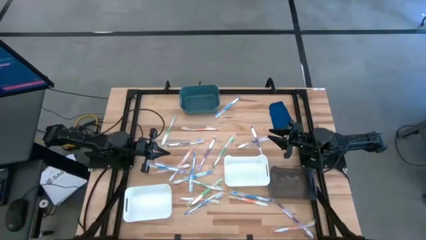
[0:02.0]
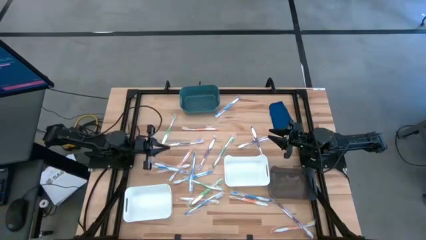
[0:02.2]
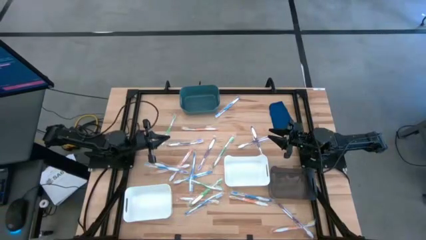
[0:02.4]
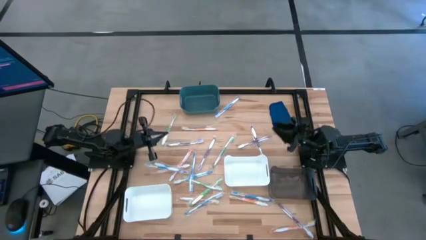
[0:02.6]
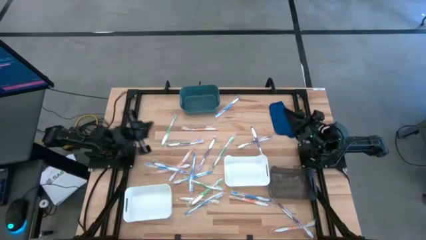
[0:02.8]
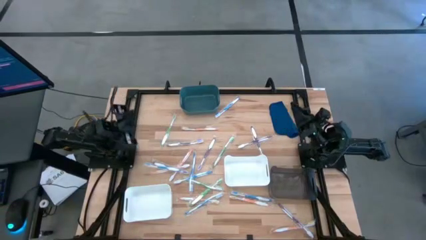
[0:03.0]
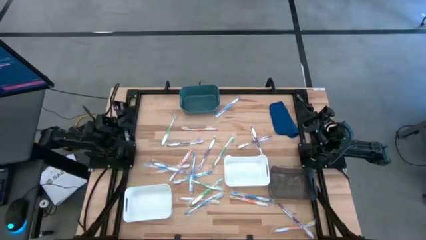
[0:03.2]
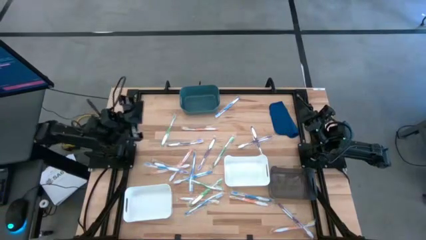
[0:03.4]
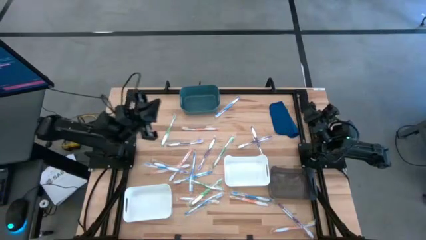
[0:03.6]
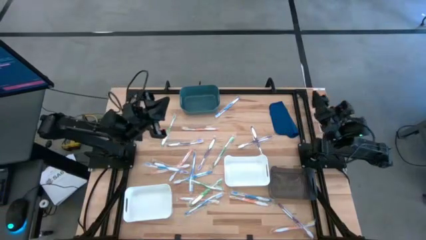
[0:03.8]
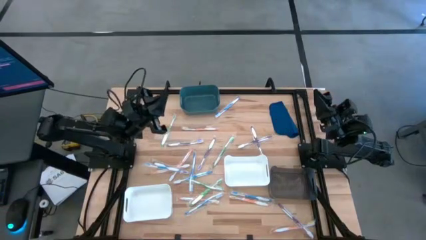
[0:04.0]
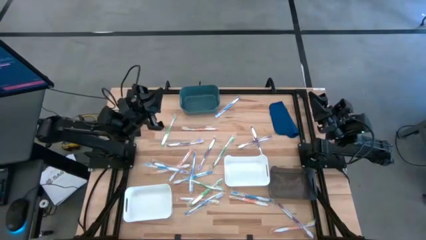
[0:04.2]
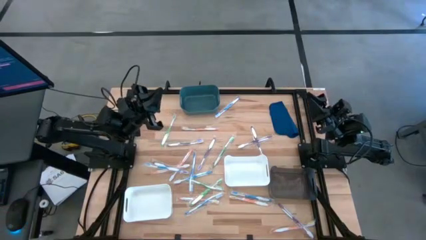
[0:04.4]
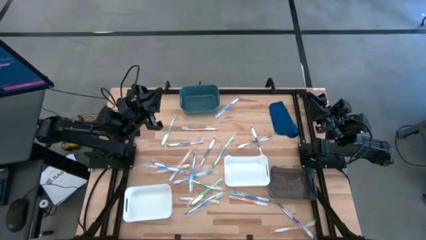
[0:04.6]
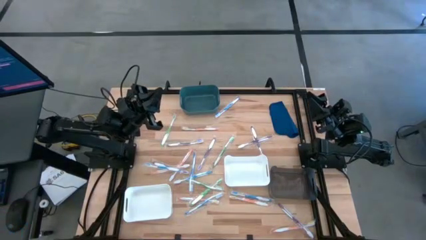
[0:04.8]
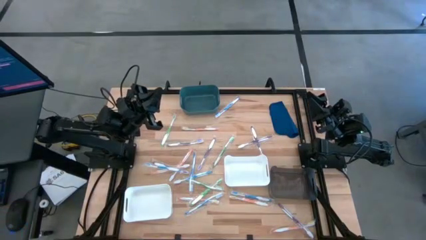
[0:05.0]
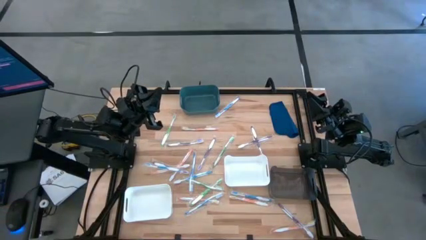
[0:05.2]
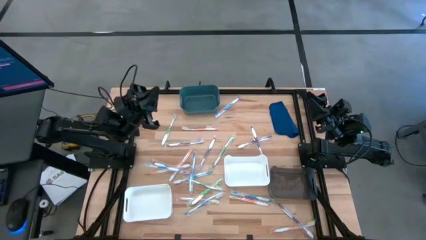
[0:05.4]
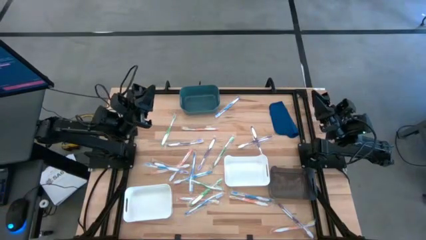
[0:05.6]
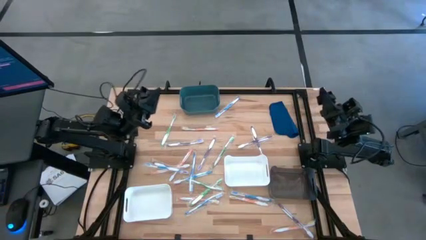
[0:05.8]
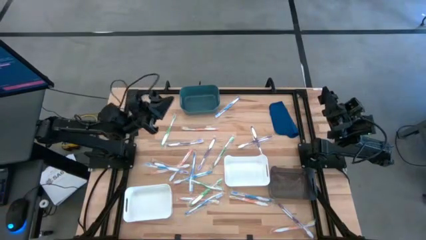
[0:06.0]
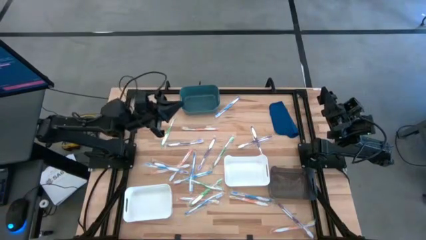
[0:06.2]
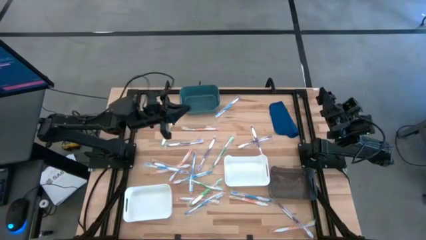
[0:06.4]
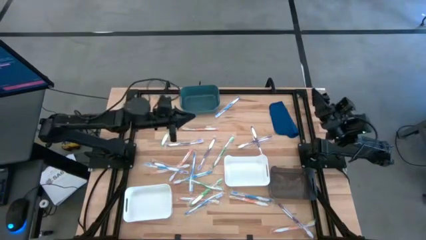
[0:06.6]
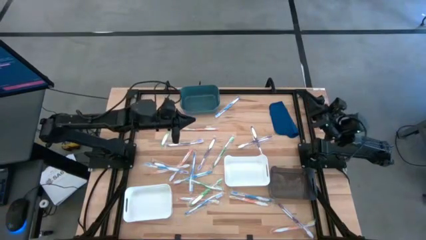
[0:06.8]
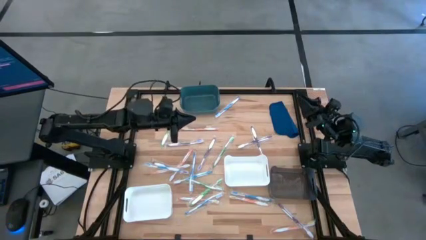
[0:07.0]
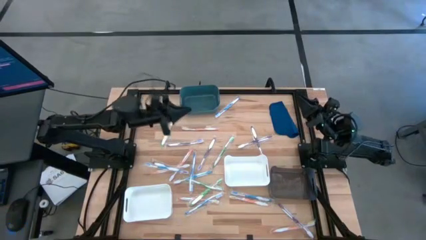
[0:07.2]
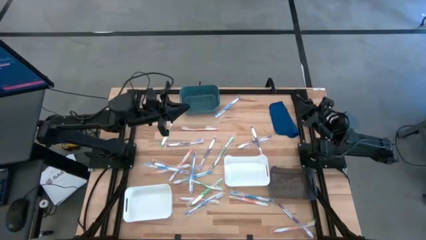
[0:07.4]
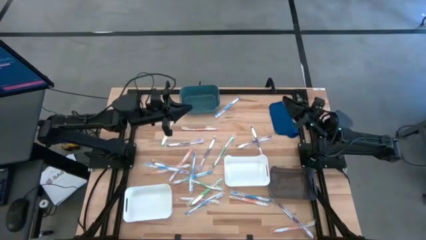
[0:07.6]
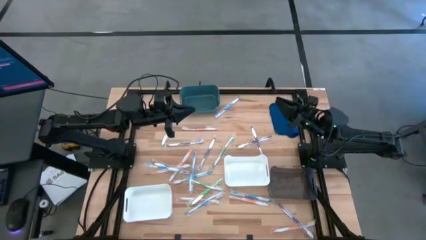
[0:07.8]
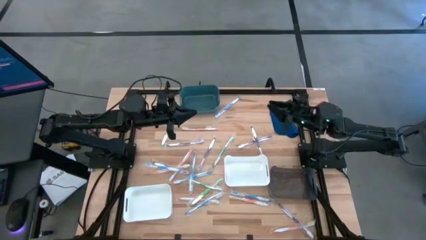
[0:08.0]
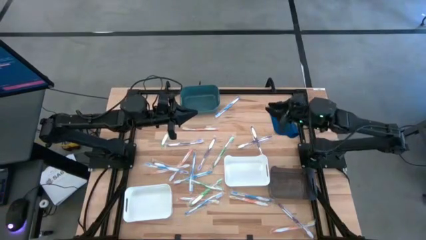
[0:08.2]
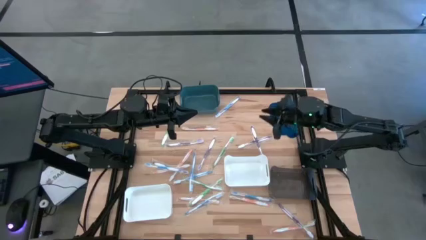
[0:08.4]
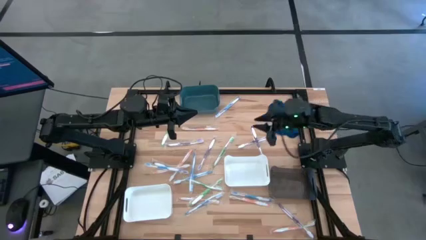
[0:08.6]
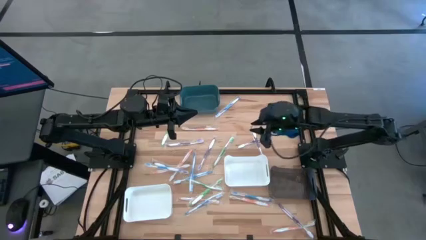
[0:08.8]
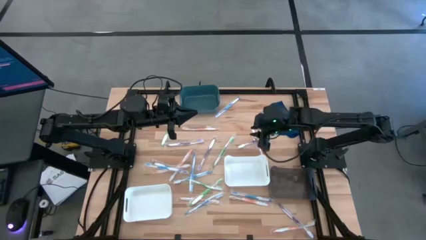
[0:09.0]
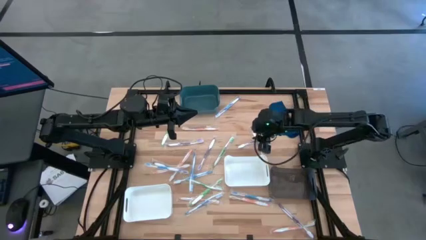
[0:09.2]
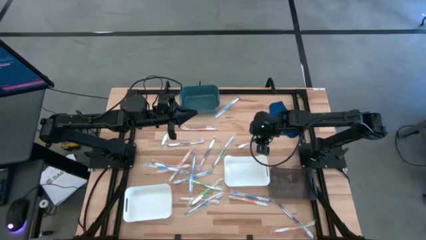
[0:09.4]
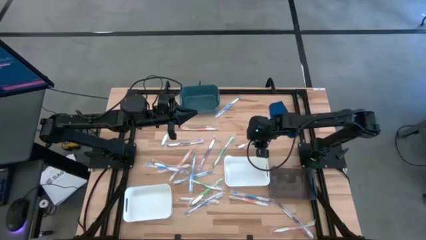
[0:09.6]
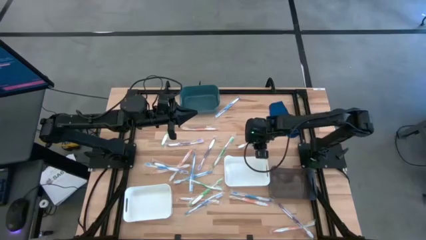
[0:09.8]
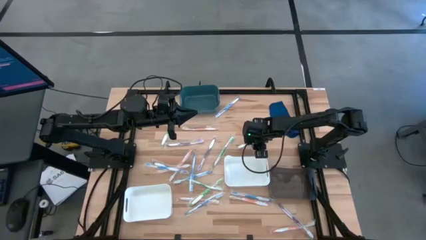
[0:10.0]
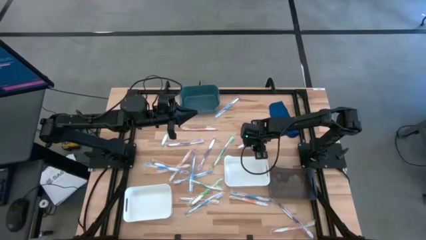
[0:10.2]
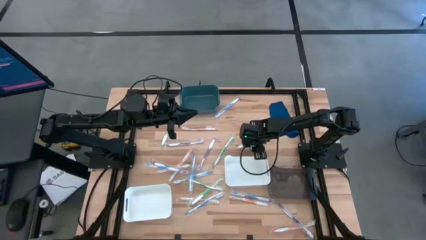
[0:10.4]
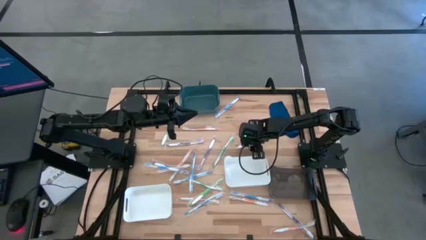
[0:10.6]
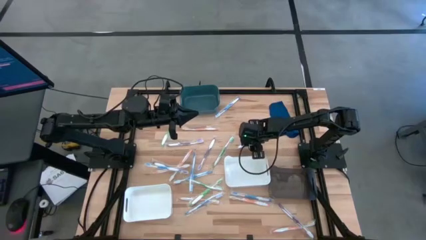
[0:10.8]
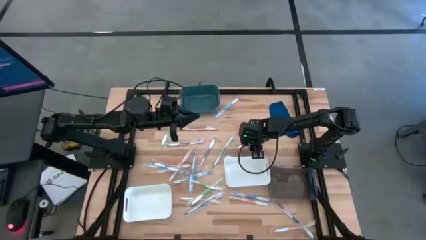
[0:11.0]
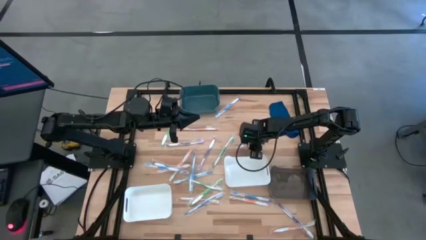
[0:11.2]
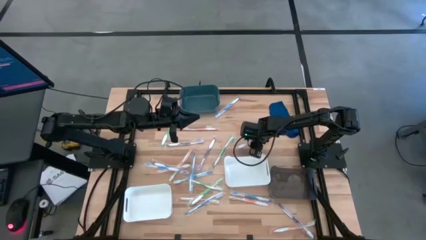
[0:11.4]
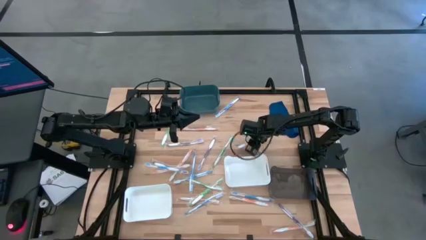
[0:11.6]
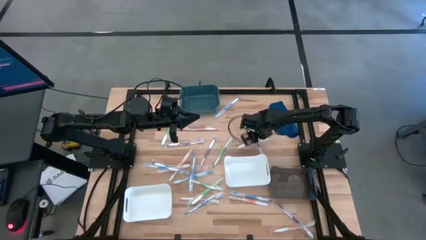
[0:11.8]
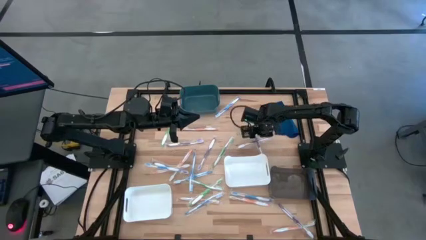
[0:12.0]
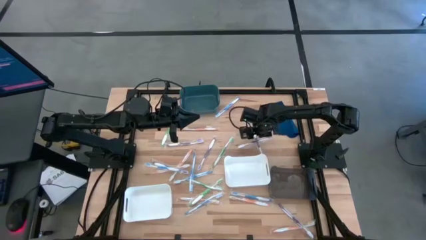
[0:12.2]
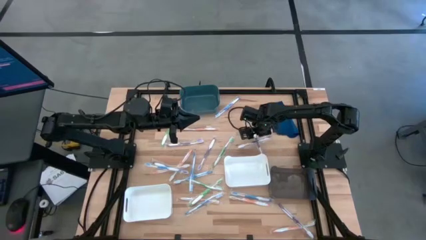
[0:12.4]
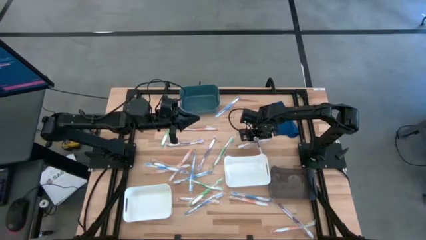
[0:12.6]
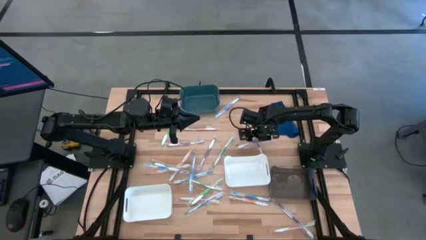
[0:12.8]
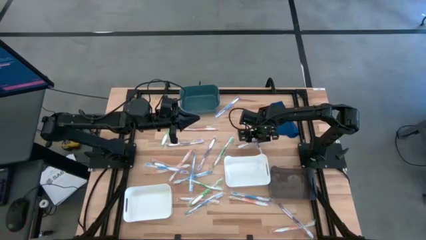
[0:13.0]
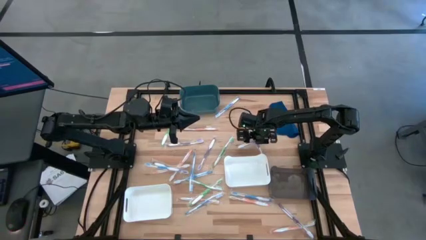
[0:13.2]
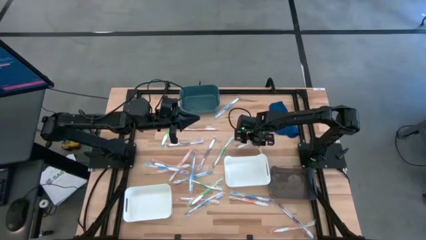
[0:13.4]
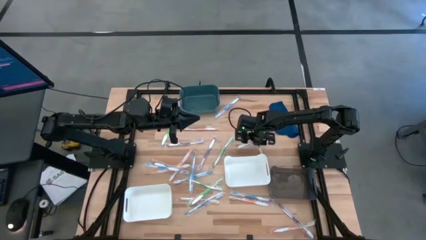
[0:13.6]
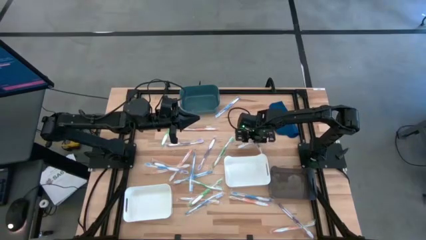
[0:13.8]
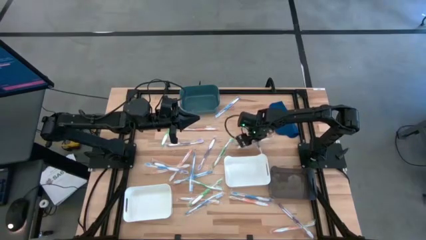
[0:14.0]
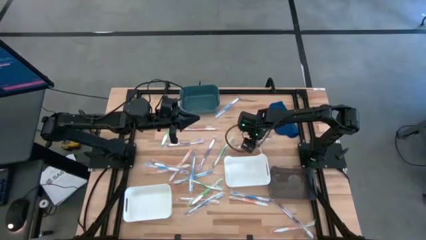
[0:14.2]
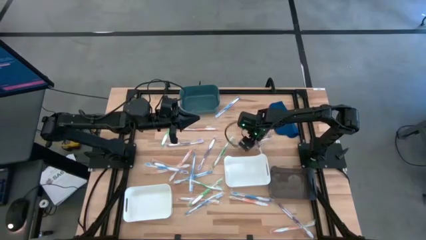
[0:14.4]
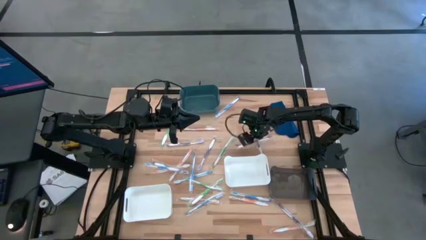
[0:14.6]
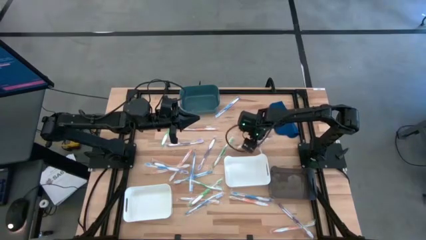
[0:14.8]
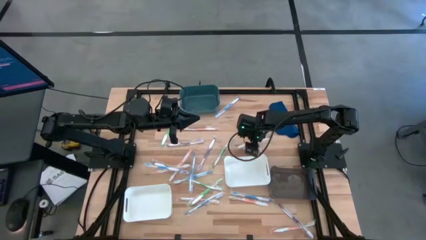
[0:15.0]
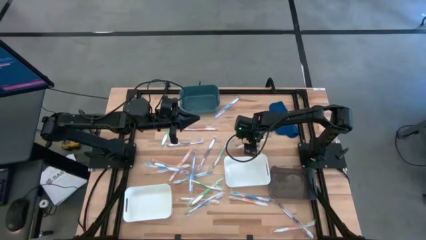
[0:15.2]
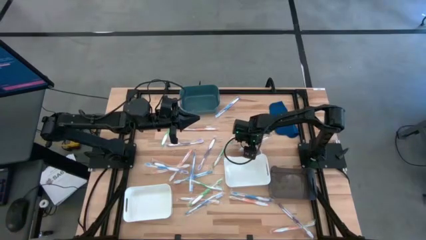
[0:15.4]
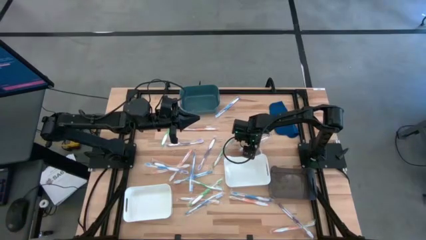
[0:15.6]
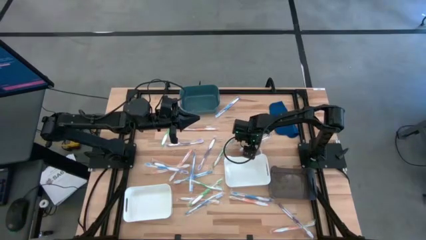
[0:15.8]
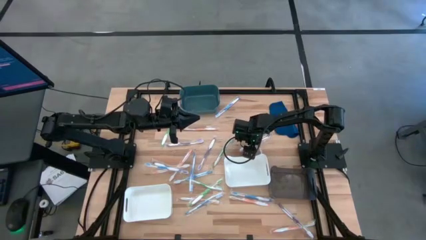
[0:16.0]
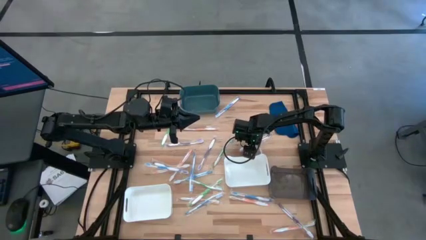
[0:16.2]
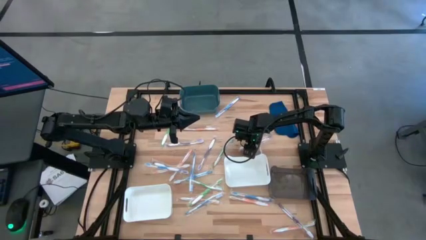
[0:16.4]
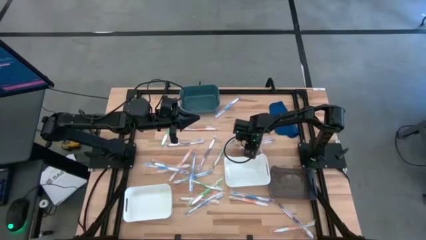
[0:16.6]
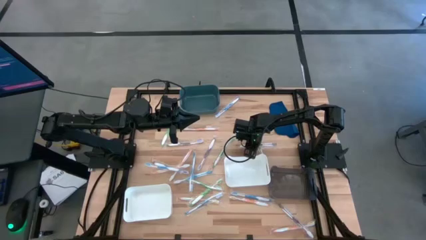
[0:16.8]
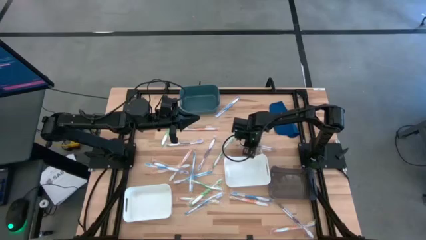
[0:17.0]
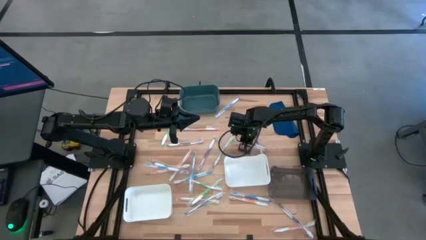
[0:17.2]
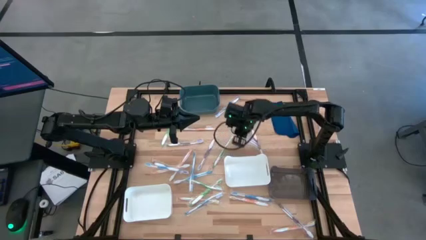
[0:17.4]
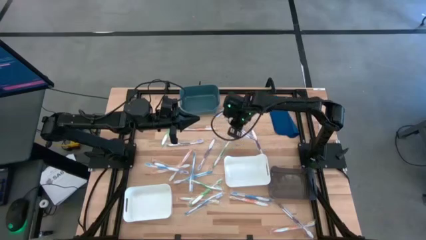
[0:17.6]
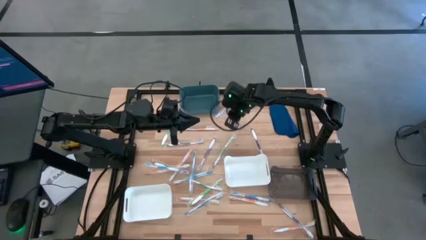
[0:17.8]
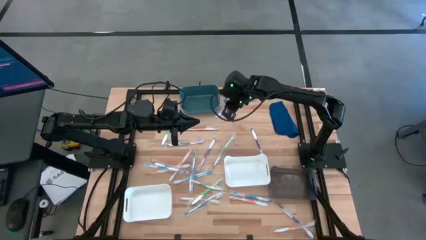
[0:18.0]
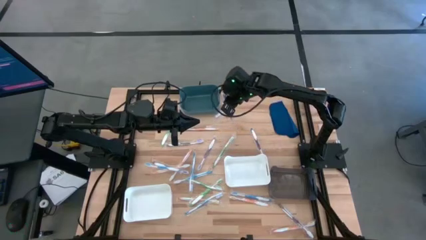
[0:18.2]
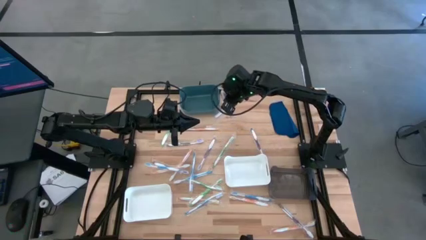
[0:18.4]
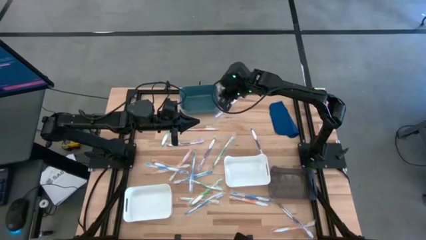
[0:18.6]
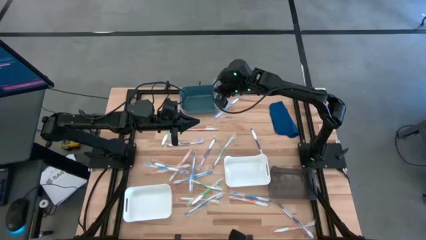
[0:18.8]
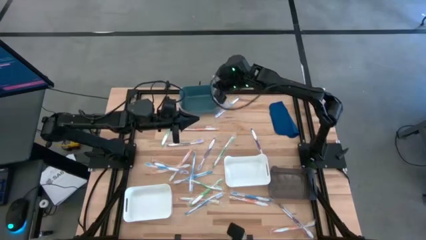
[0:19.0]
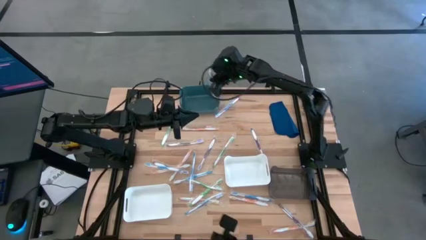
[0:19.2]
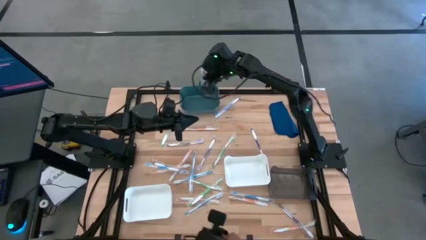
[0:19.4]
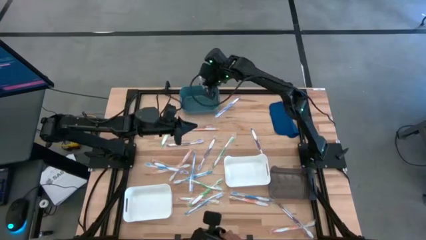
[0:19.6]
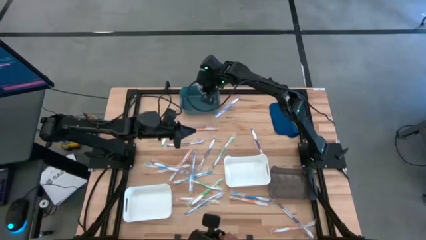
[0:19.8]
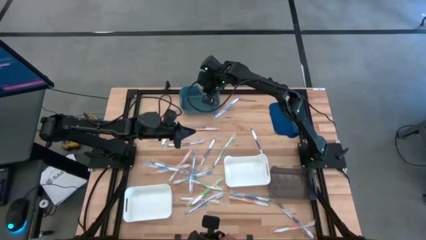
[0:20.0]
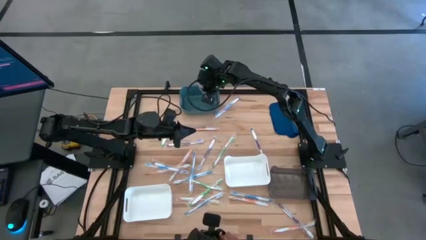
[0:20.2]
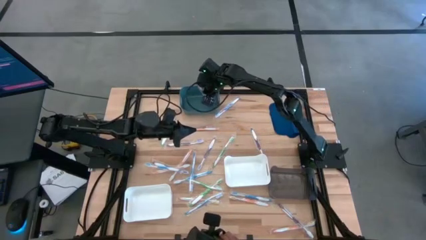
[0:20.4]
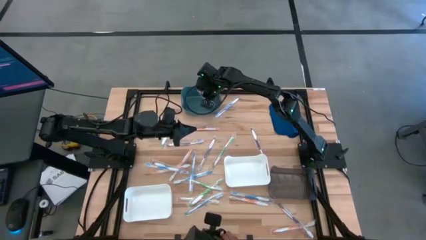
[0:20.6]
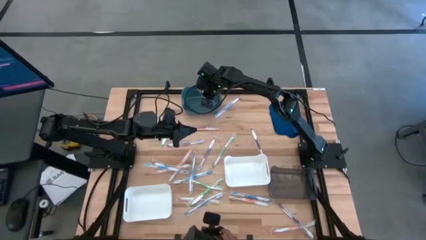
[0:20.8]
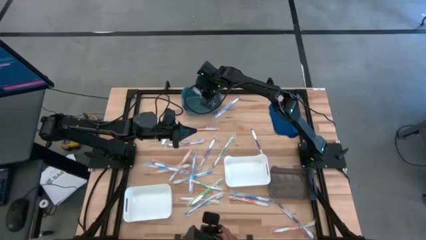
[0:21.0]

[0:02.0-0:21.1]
Task: Pick & Place Toothbrushes
Put the violet toothbrush into the blue bin
